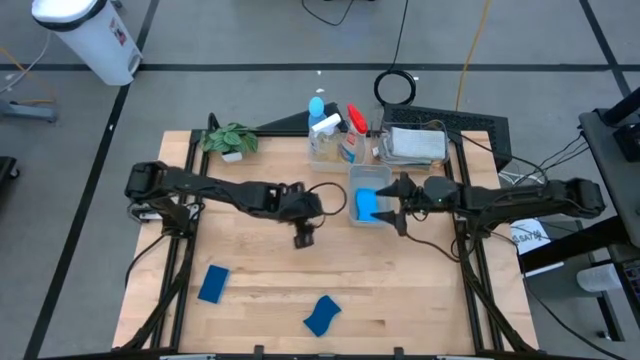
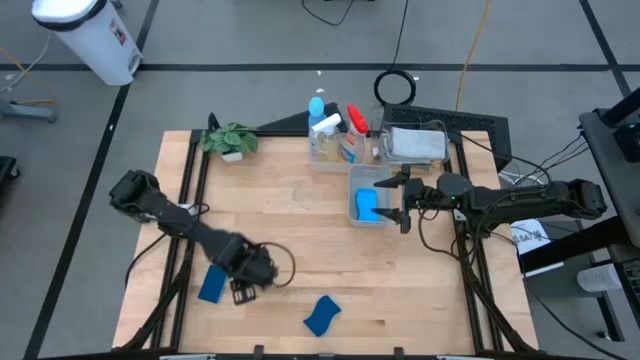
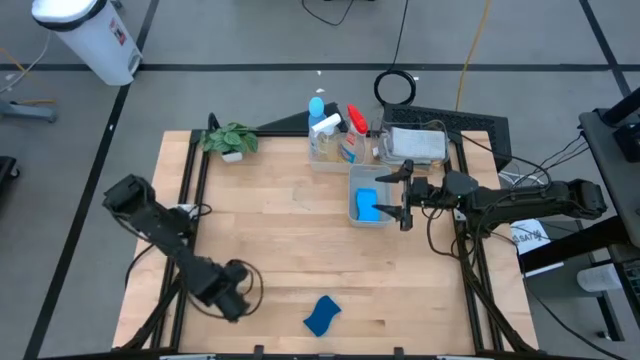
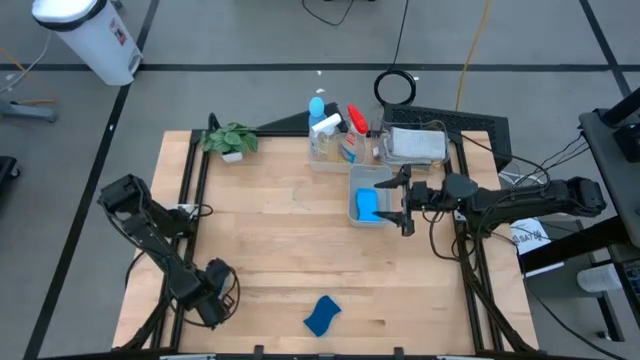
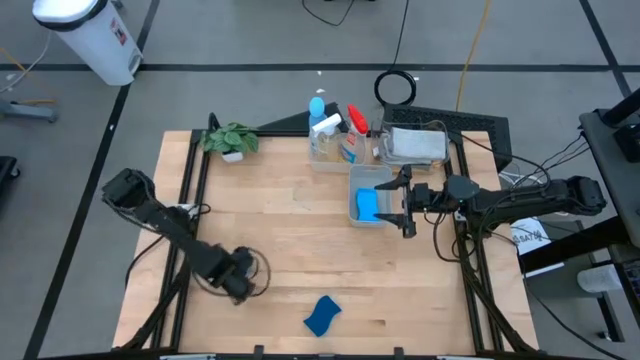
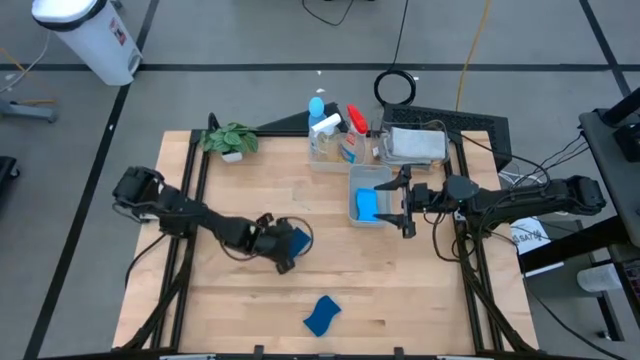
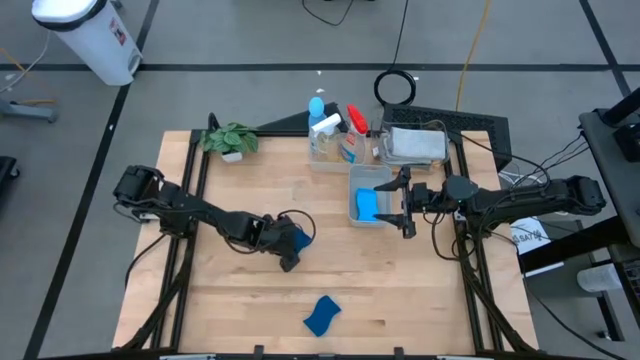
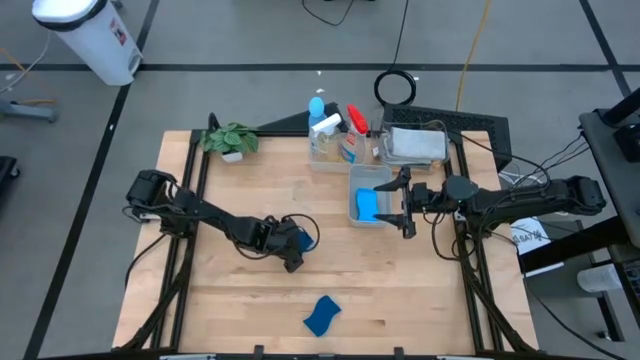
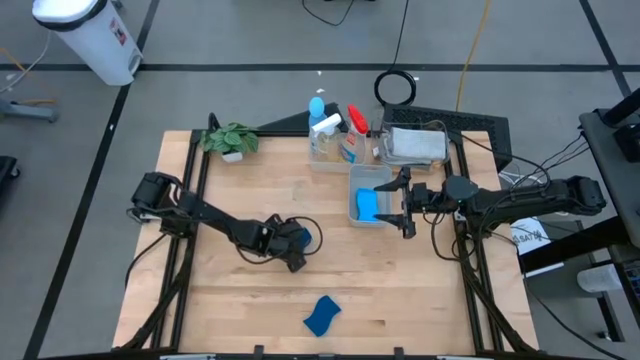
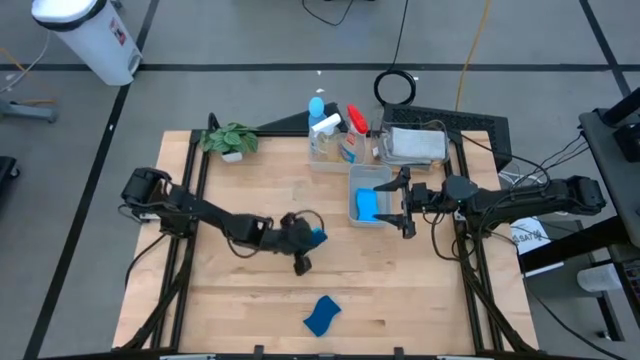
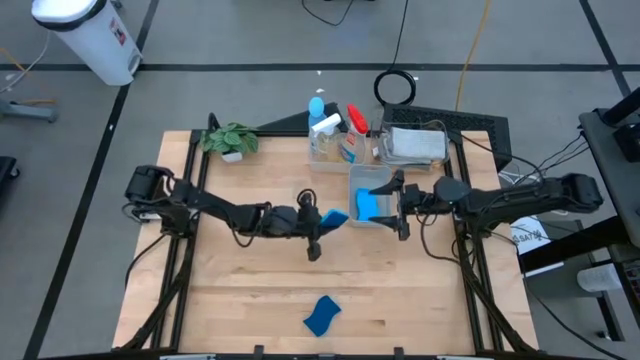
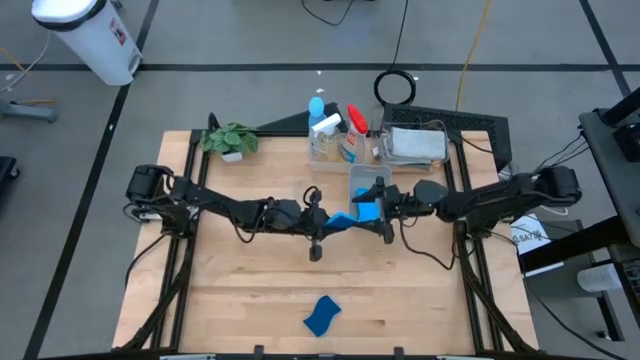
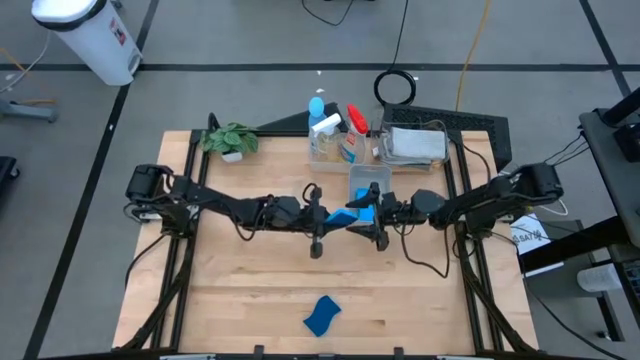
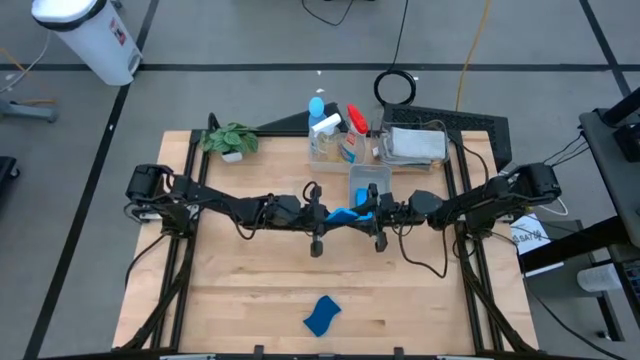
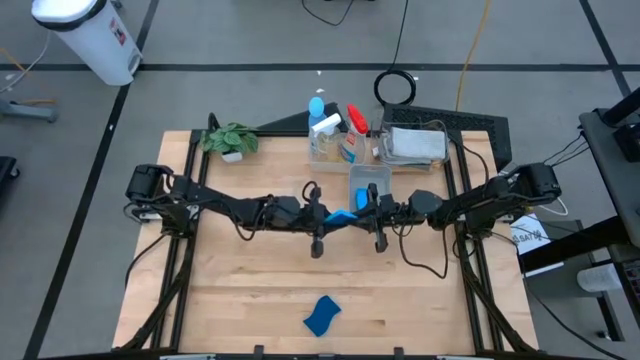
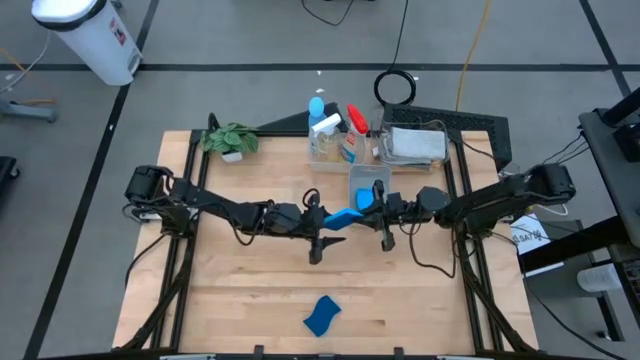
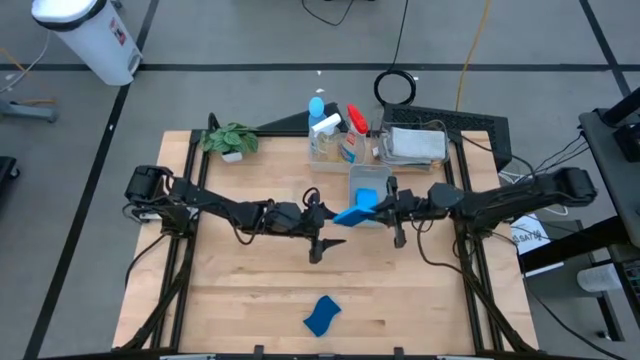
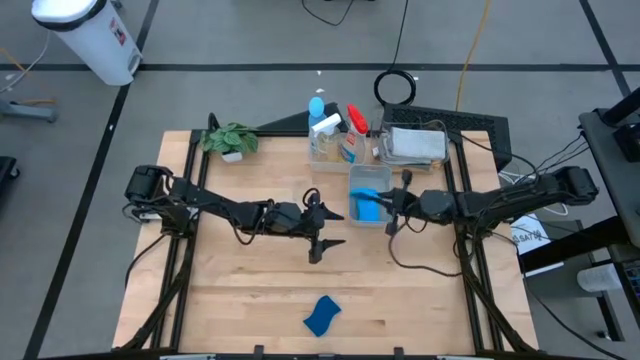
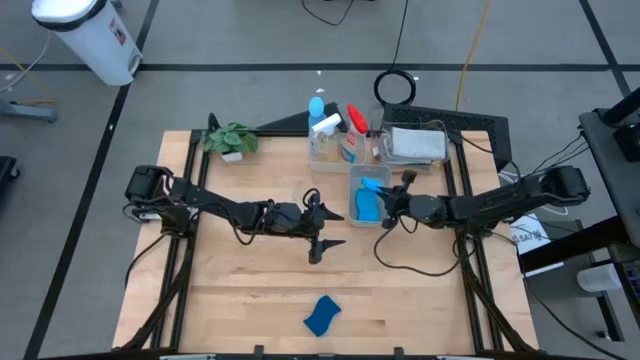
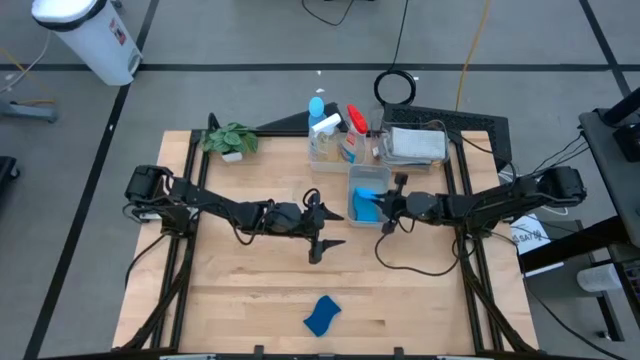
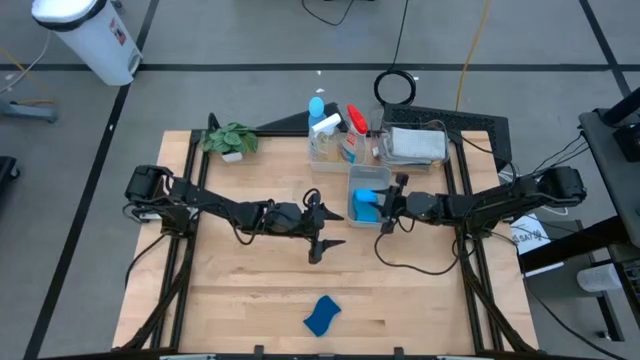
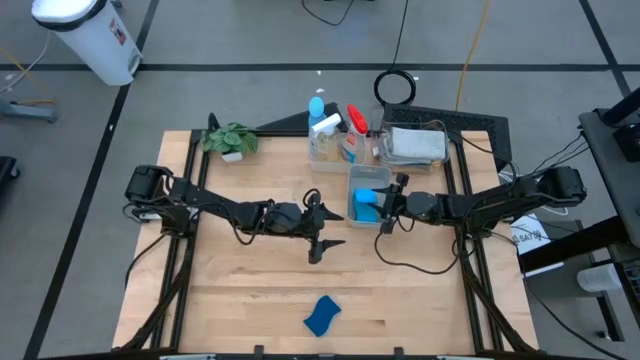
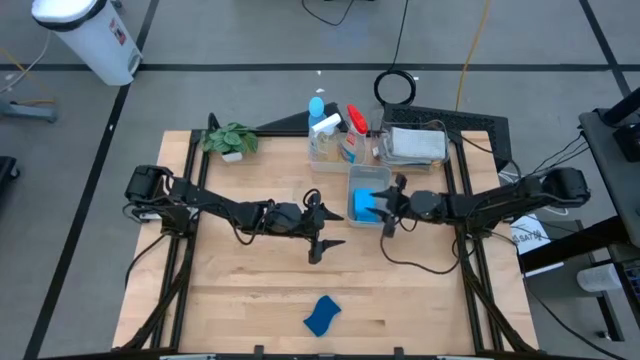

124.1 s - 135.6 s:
Task: Pick & Place Kitchen Items
Put the blue sponge into the gray bin

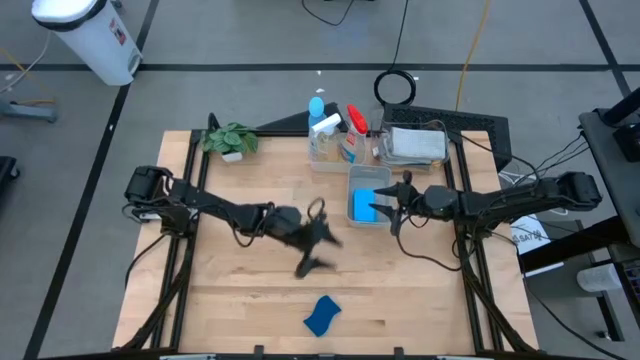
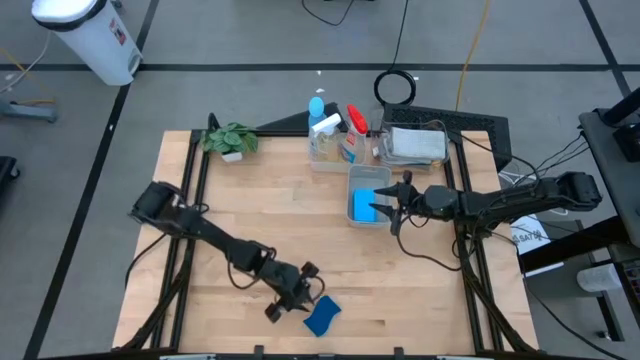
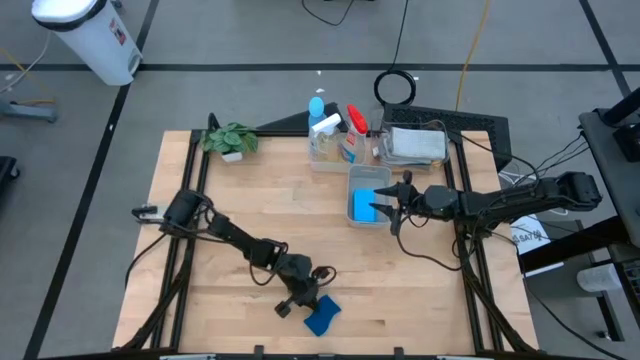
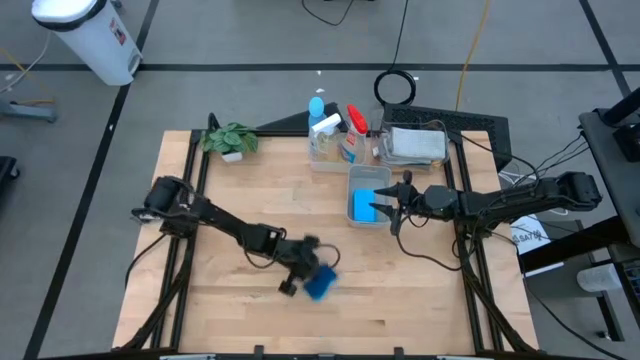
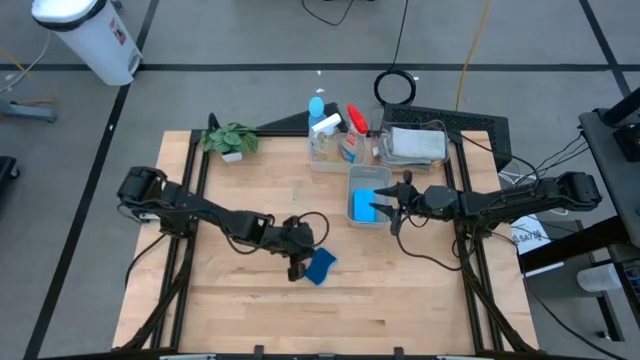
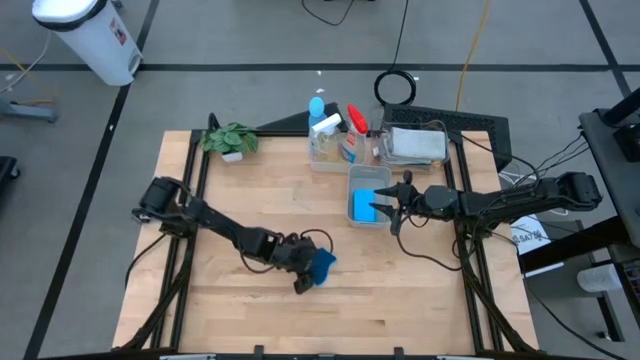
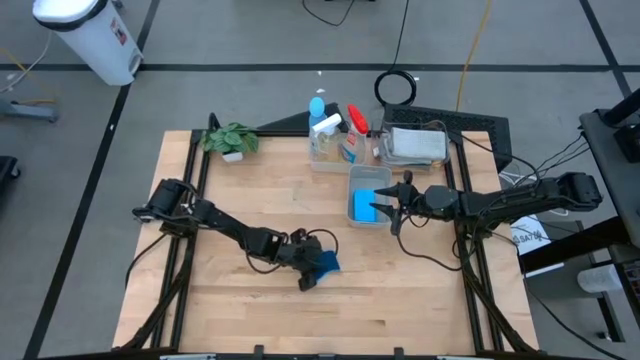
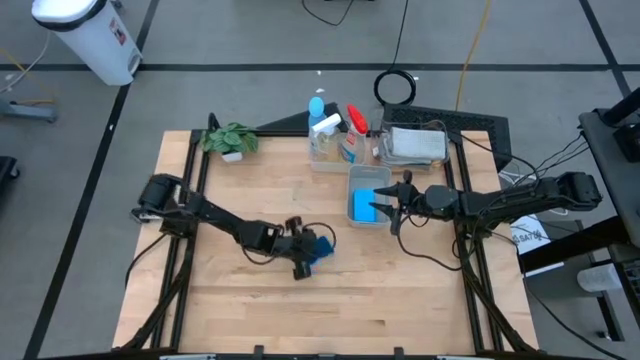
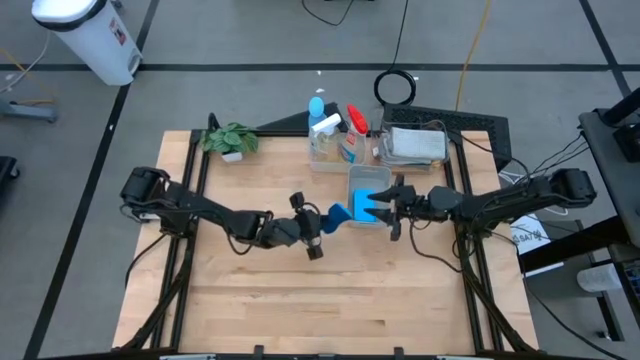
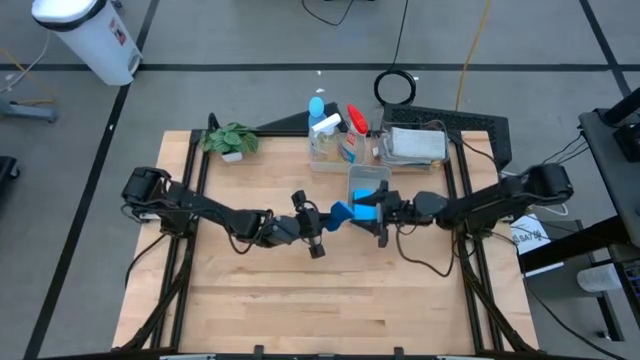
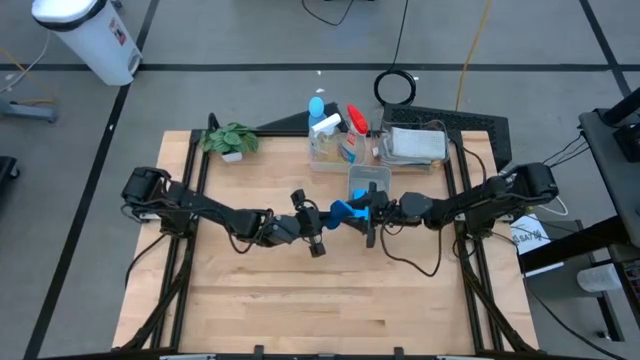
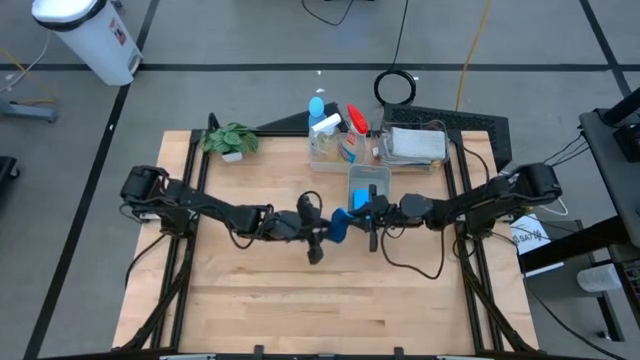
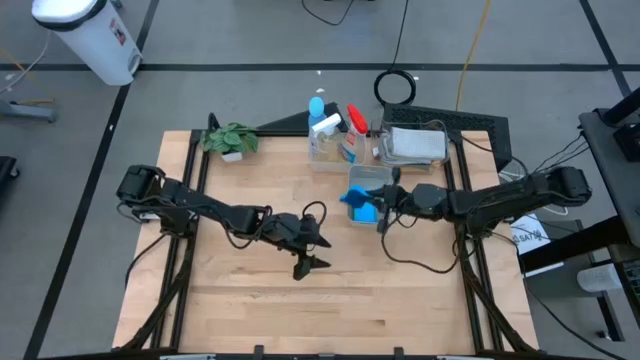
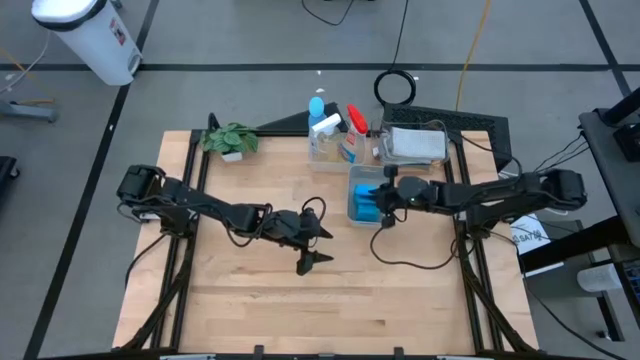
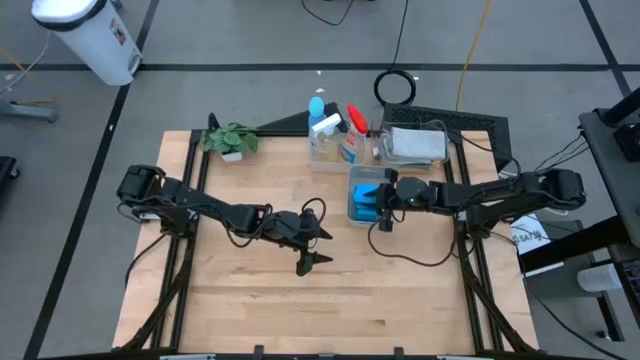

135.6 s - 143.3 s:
Put the blue sponge into the gray bin

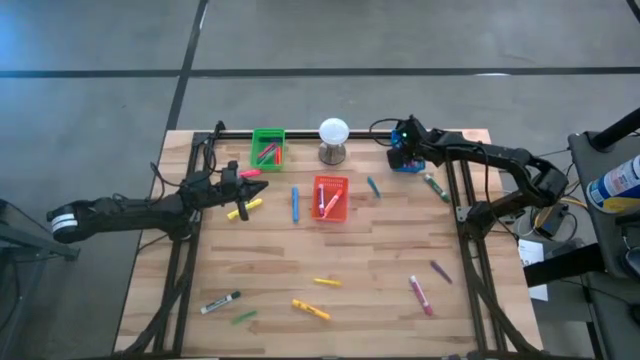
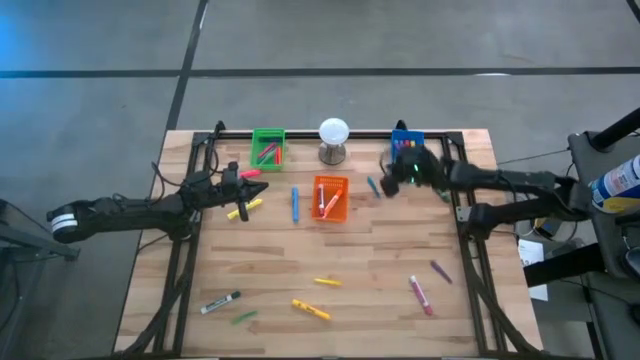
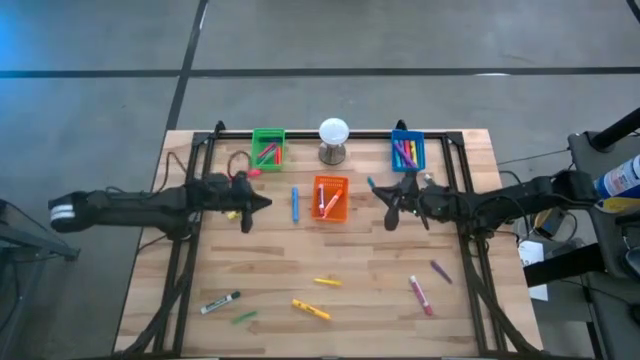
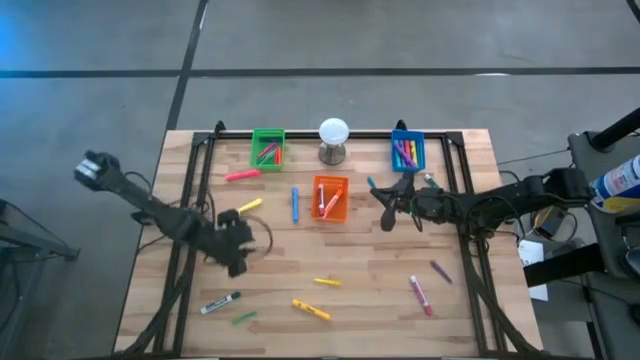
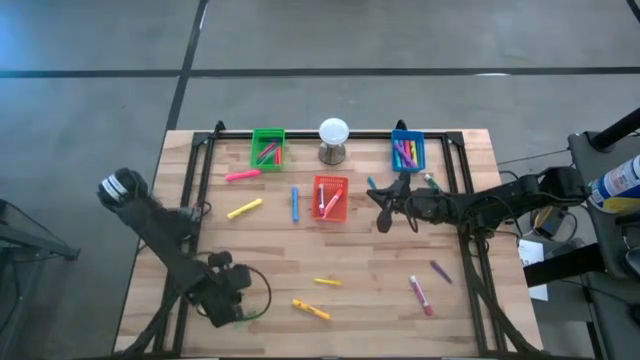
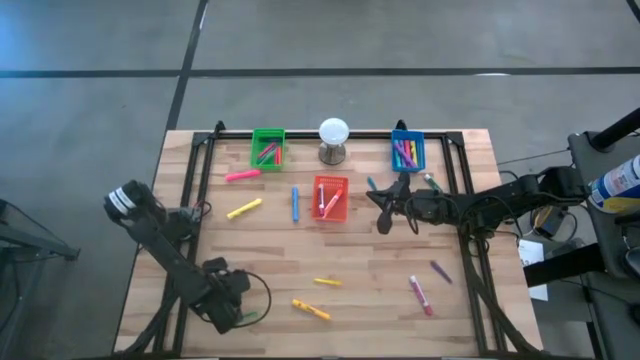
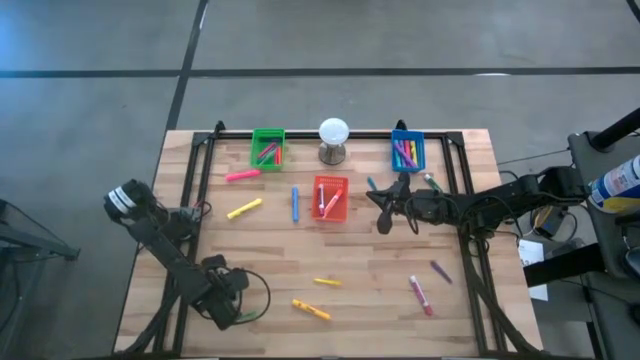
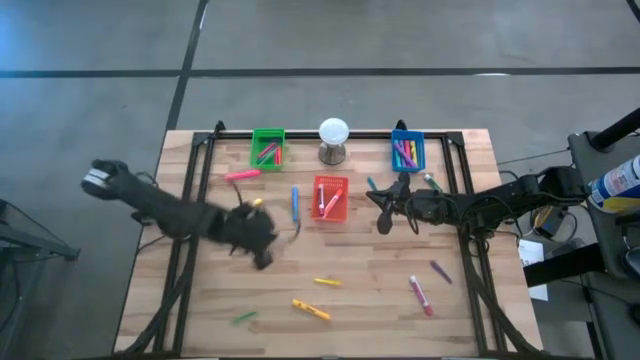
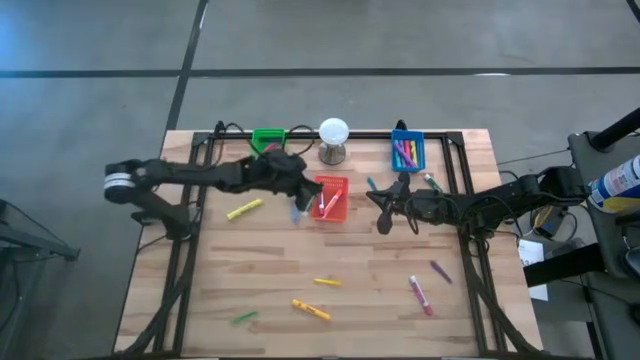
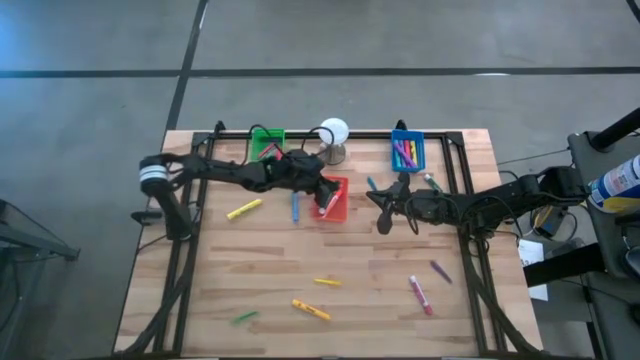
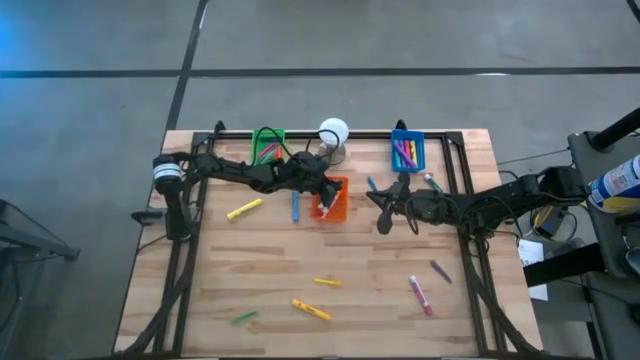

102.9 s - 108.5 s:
Task: Pick & Place Markers
Put the dark green marker into the orange bin
